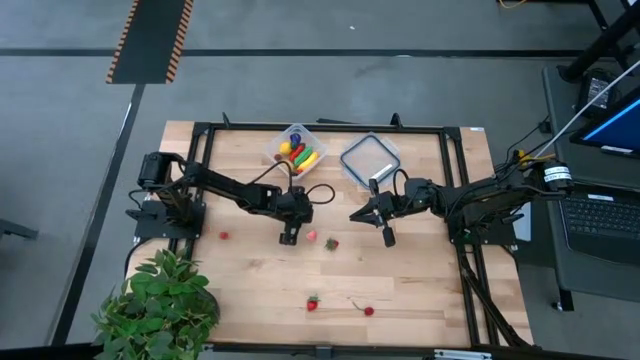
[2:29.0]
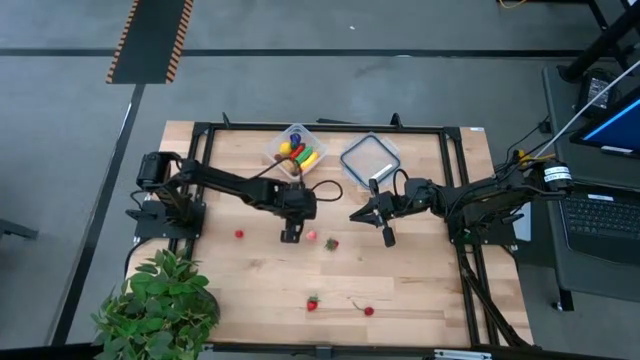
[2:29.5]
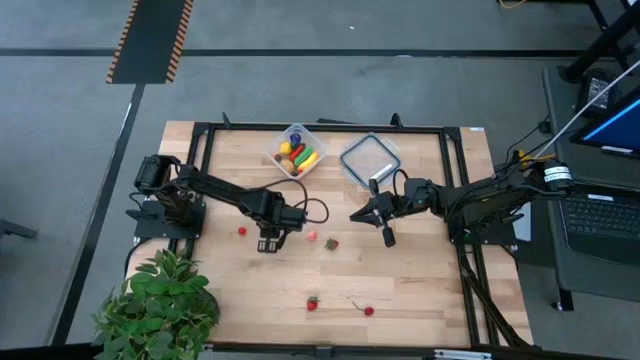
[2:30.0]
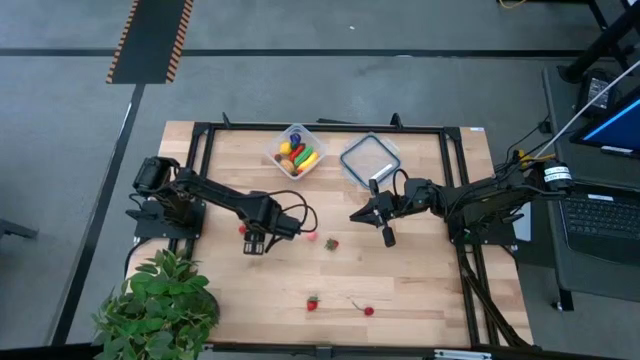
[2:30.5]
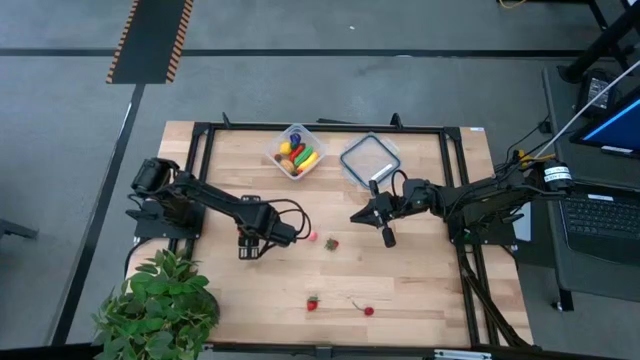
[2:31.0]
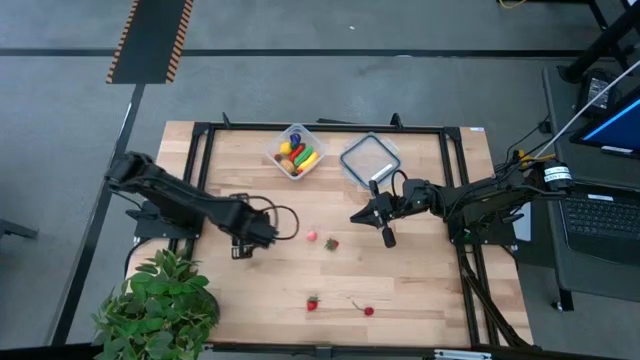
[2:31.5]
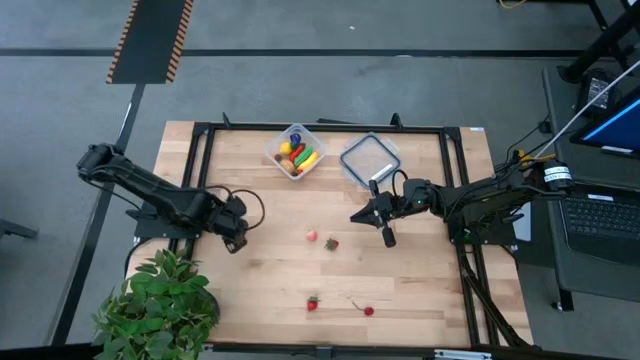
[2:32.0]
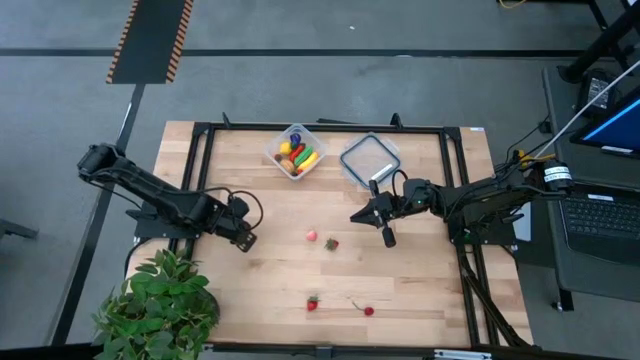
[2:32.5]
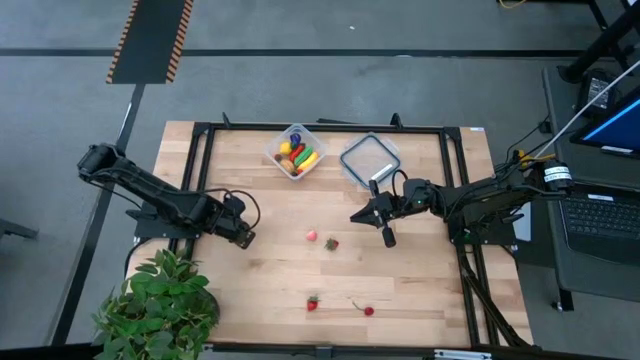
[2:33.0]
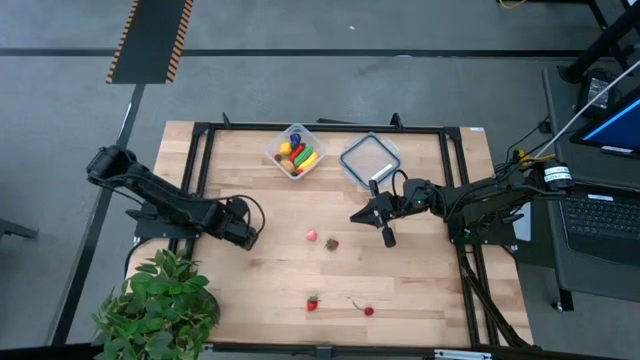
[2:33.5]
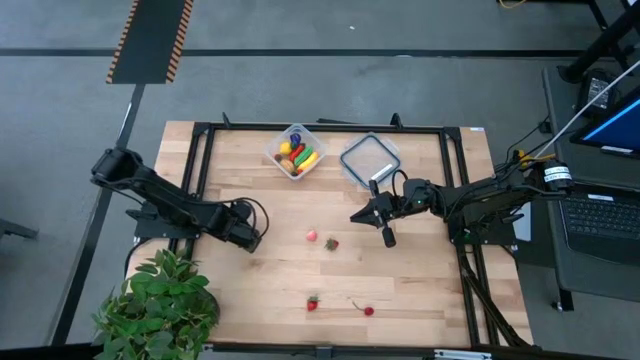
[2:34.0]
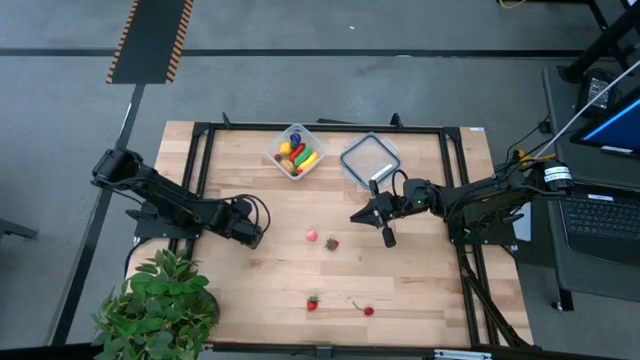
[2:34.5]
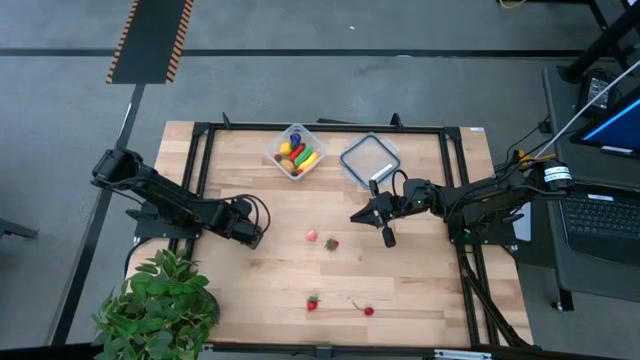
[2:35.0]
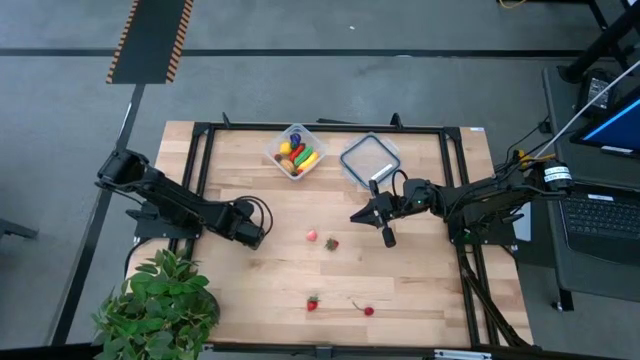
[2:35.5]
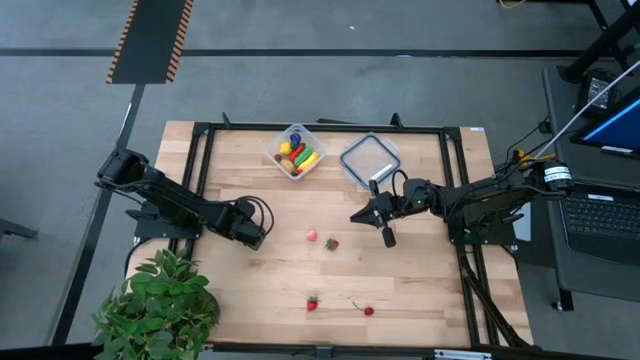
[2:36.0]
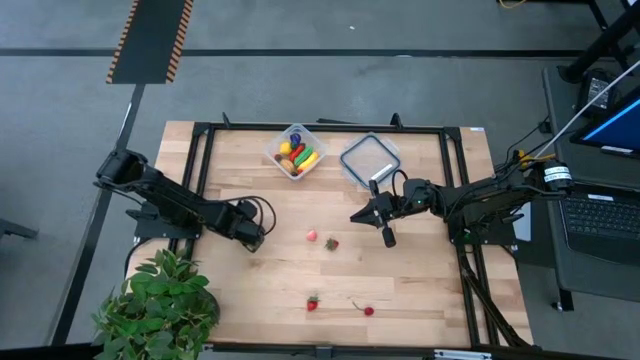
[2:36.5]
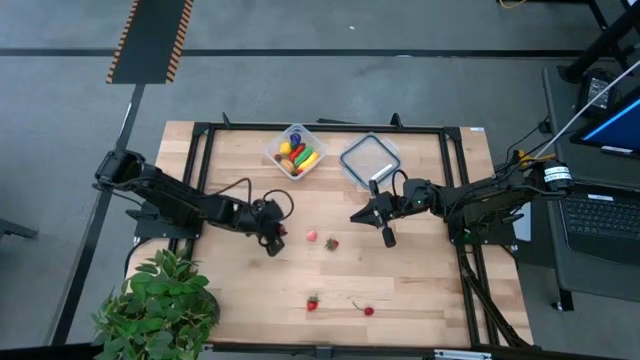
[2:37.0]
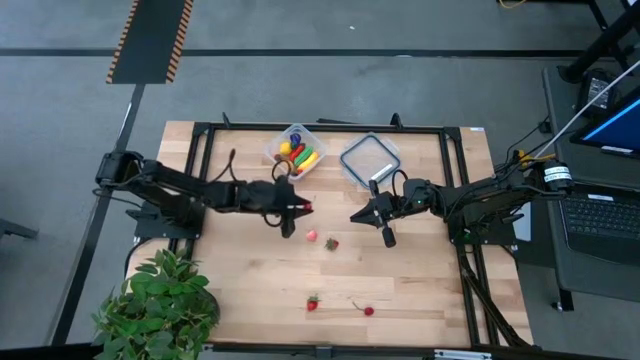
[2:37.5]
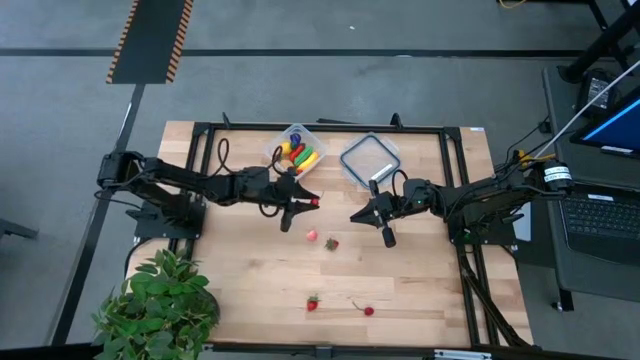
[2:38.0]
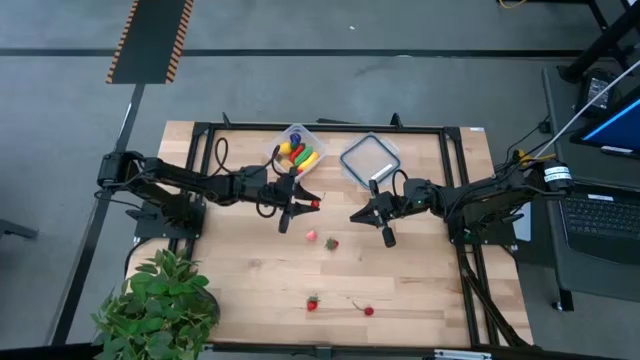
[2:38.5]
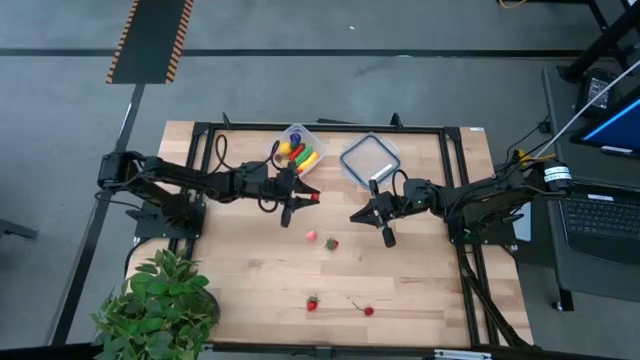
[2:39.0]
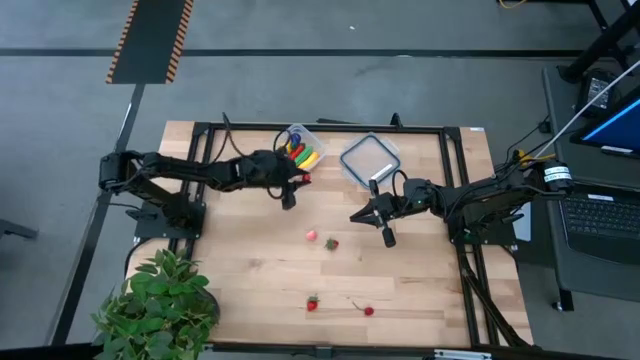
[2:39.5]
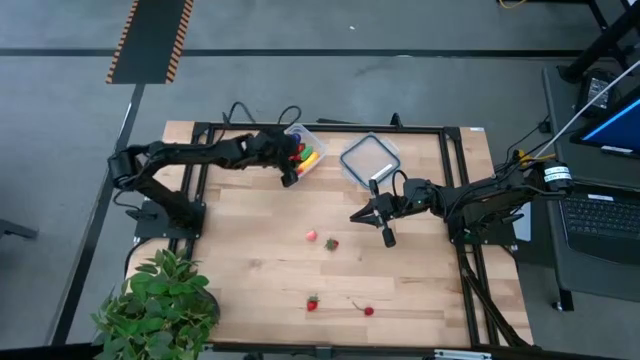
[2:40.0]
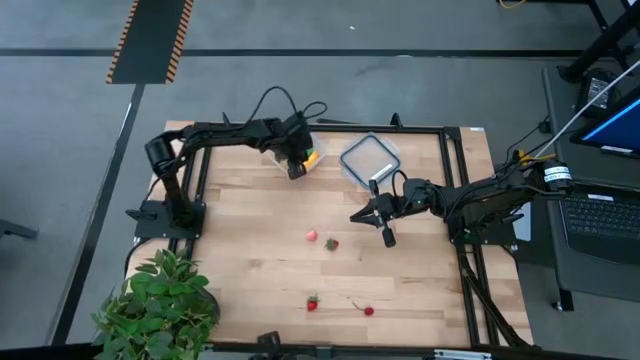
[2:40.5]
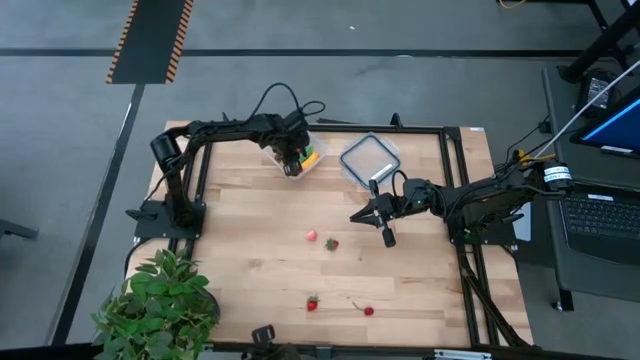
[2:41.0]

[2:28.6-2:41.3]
Task: Pick and placing Produce into tupperware
Put the top cherry into the transparent container

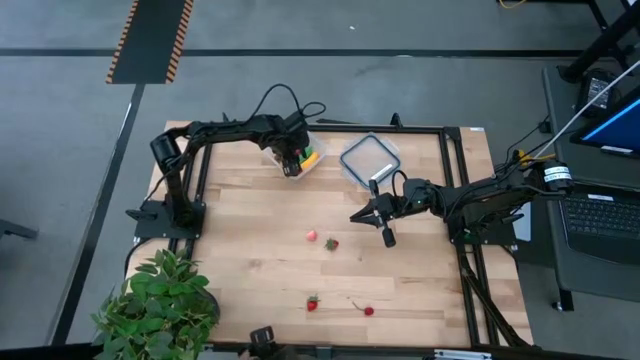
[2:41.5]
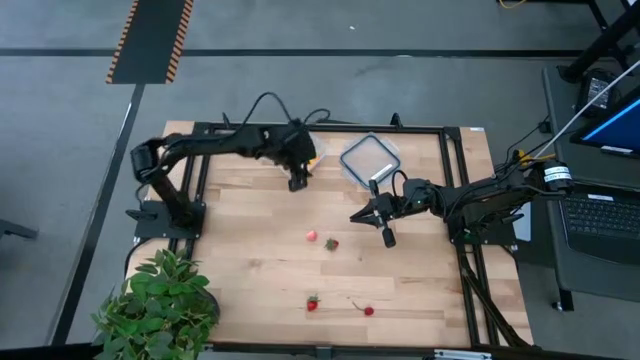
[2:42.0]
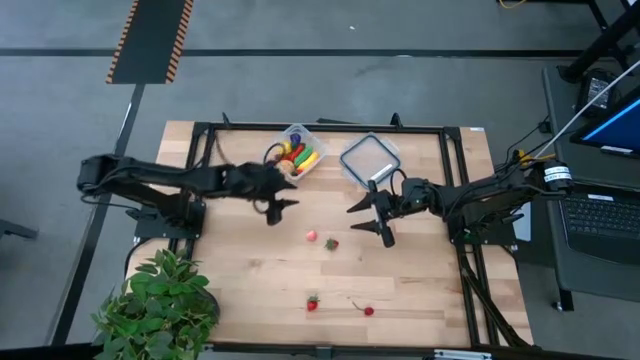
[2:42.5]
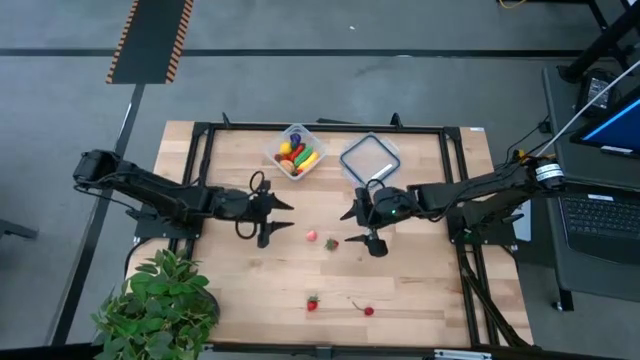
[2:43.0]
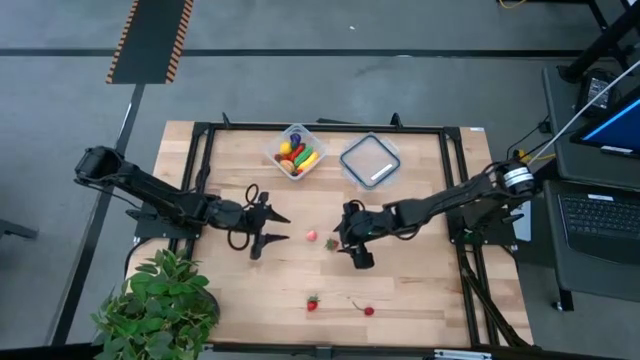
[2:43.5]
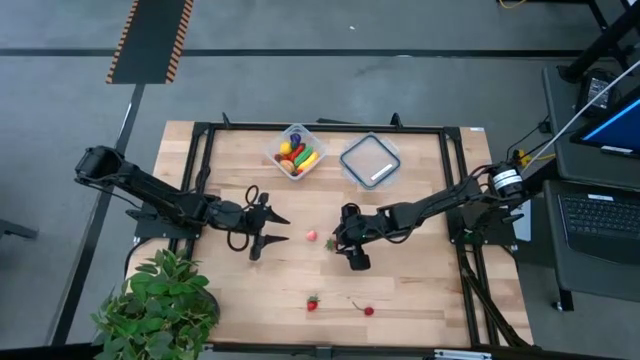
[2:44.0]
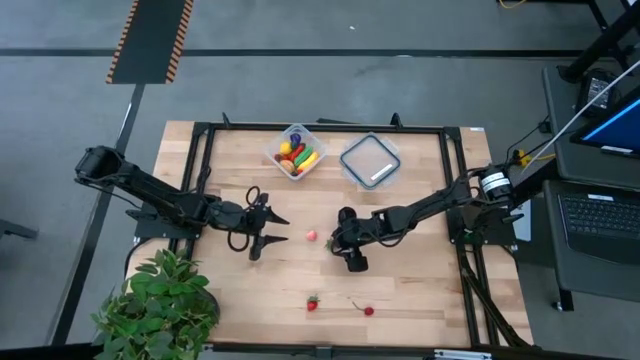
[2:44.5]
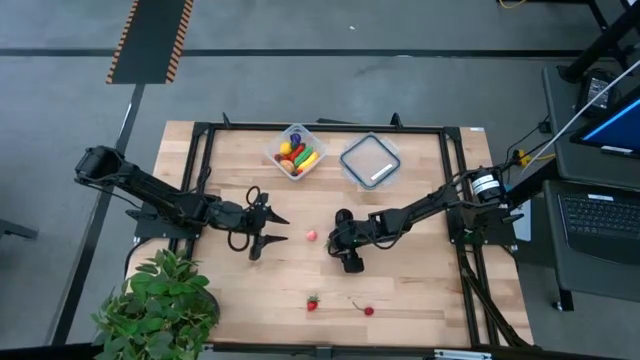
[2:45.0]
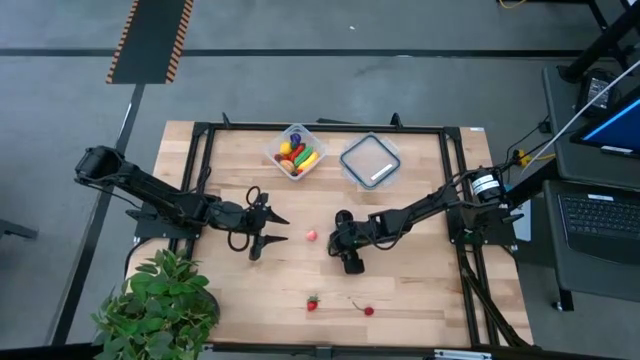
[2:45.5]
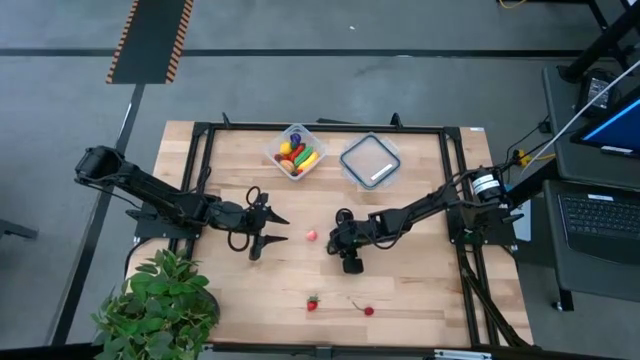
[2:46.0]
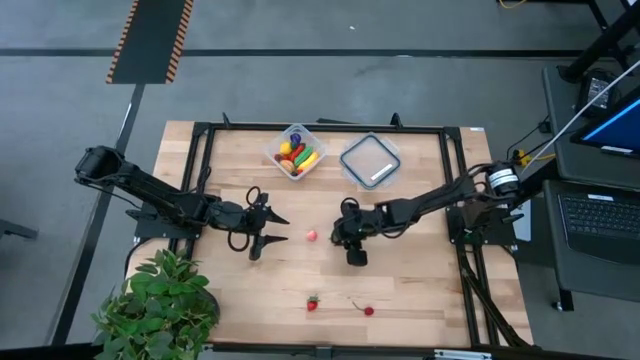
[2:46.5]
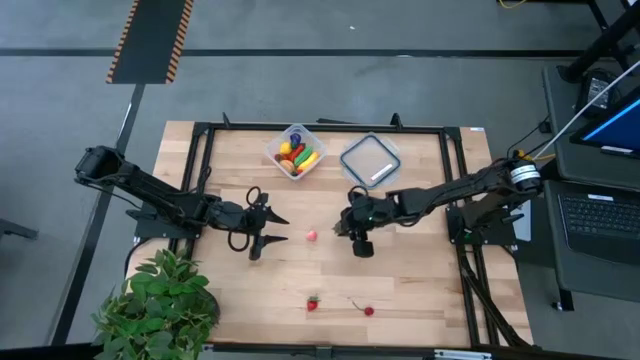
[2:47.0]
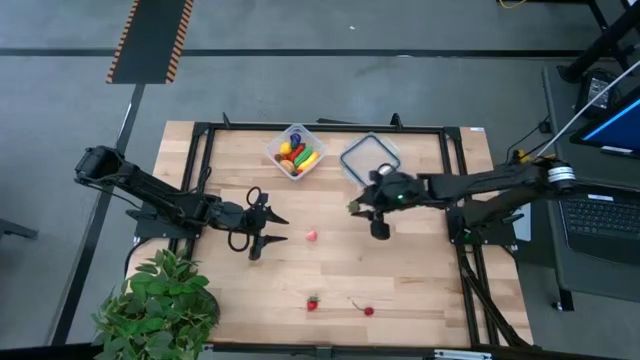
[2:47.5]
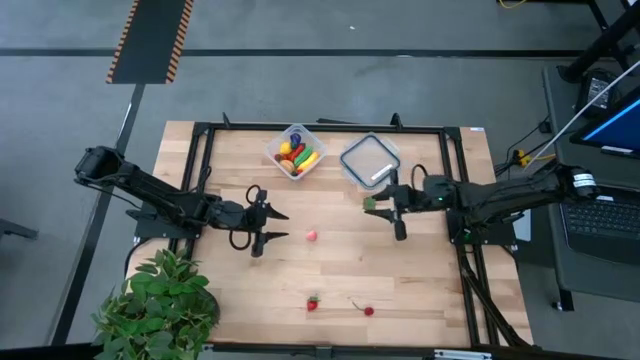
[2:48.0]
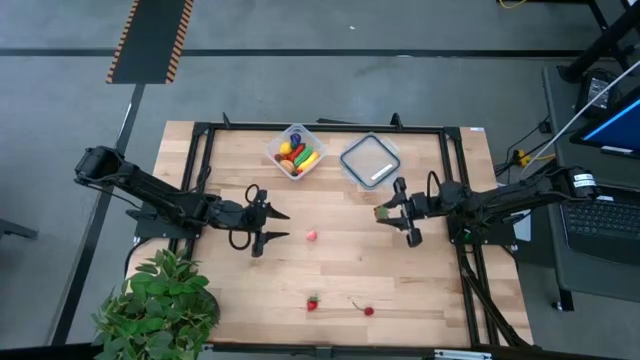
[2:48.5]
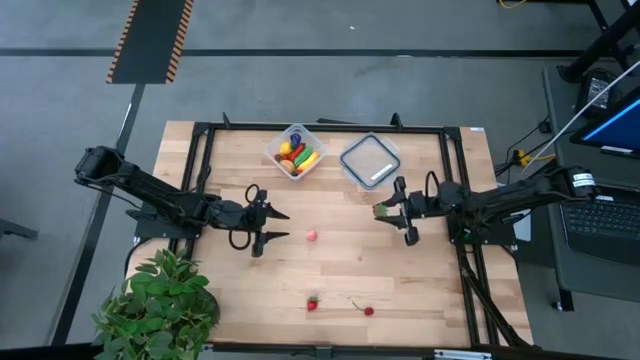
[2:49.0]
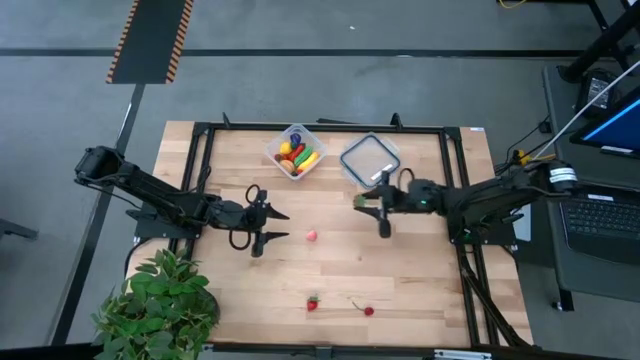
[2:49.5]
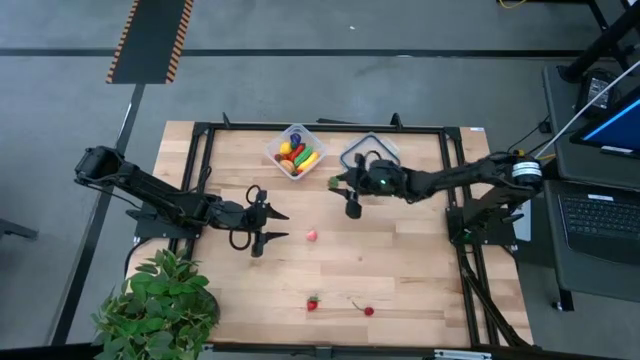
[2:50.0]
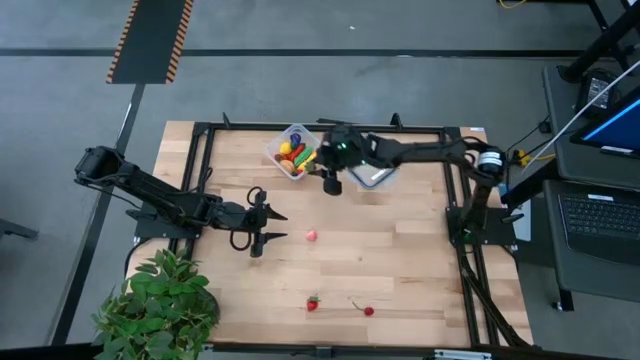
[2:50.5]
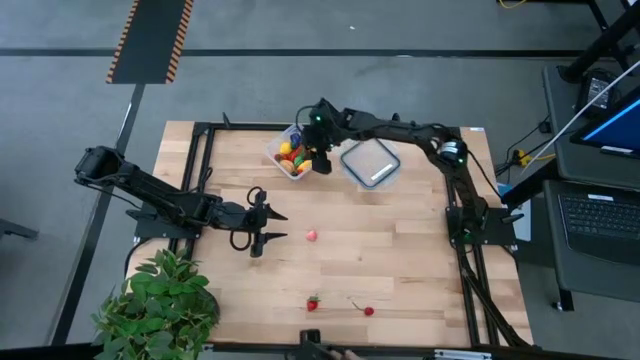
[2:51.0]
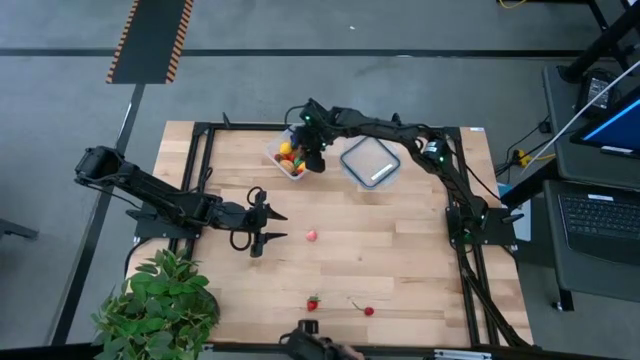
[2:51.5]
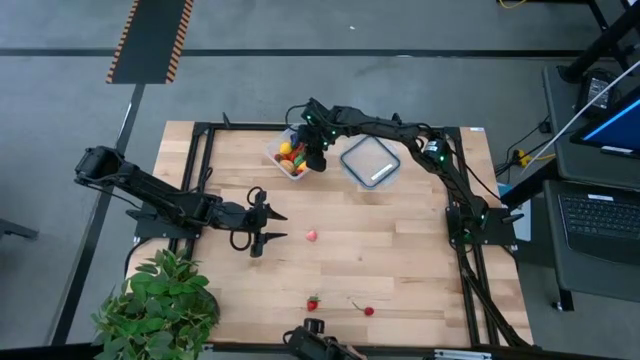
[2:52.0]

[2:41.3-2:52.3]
Put the top strawberry into the transparent container
